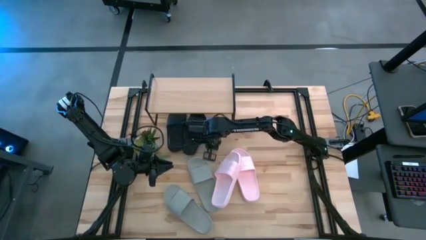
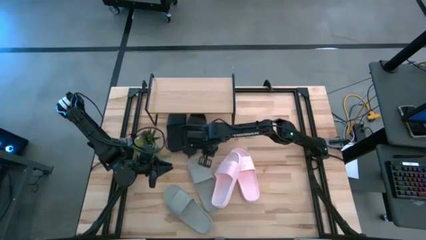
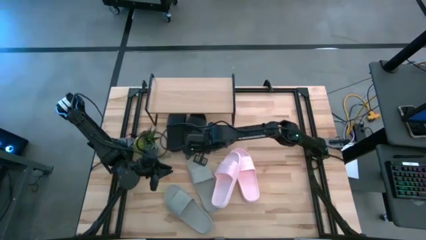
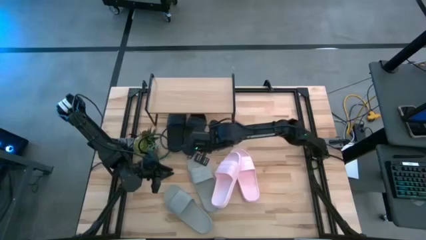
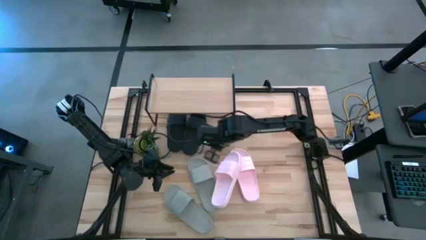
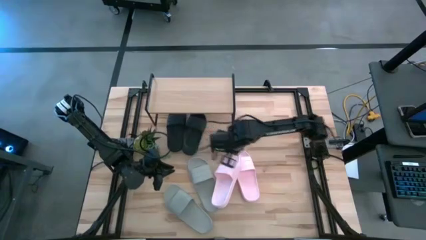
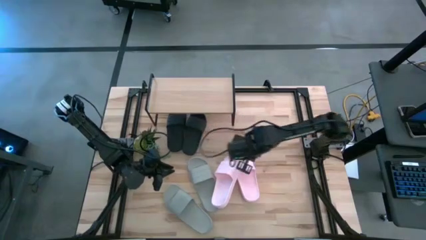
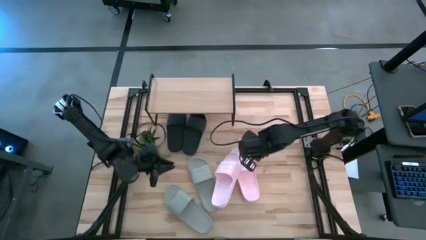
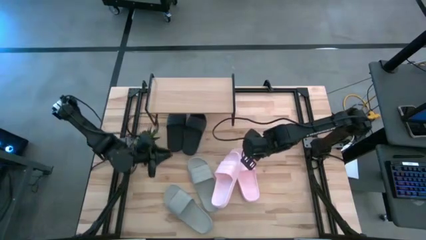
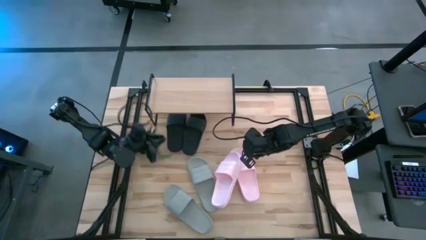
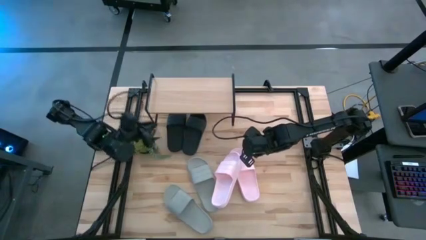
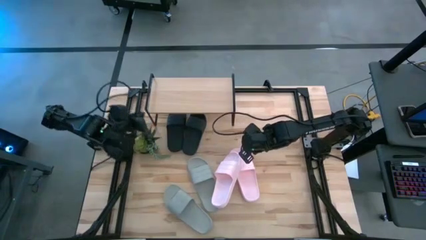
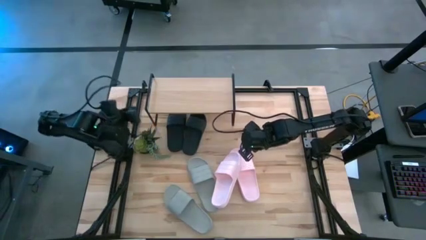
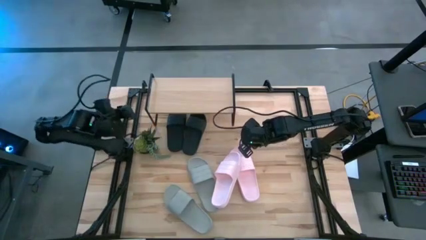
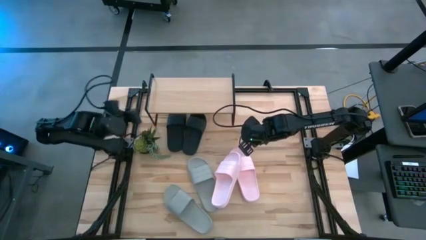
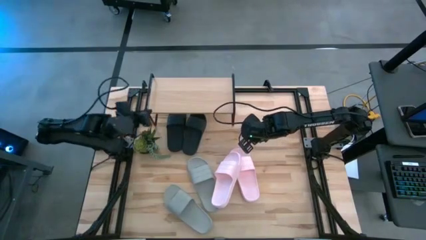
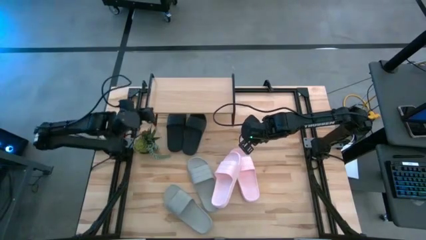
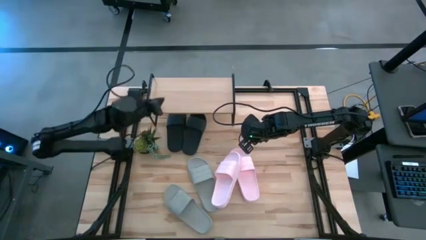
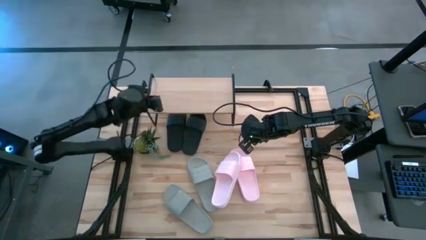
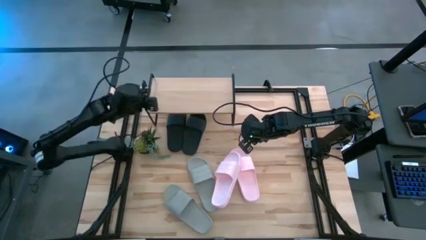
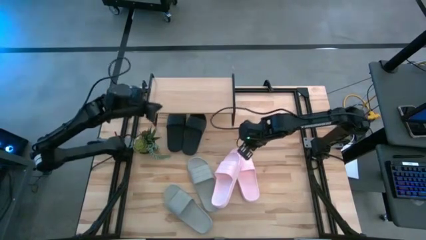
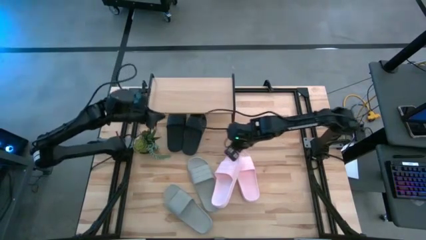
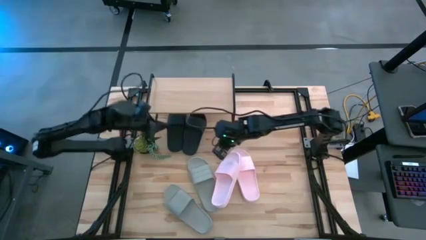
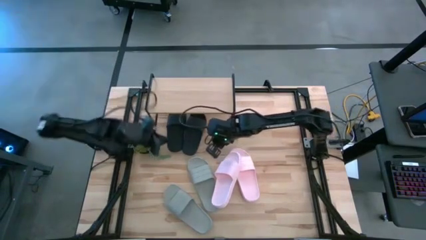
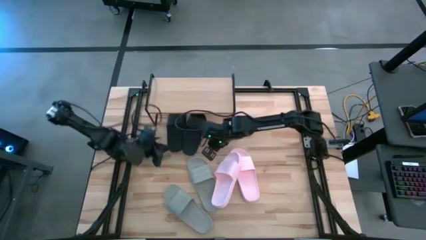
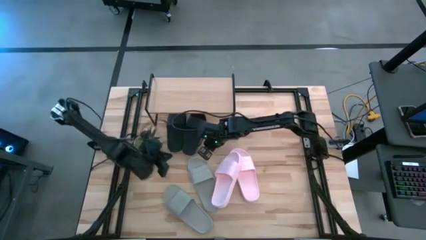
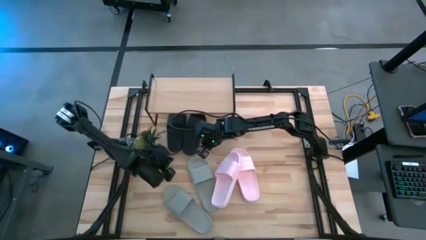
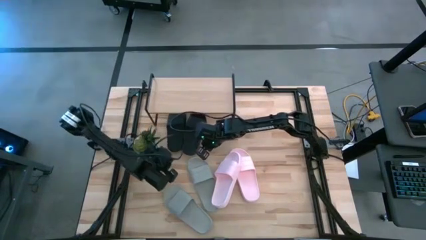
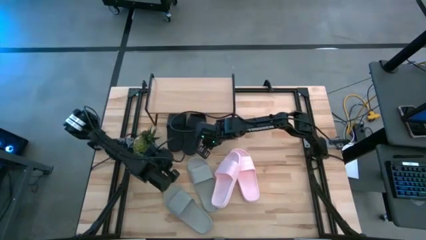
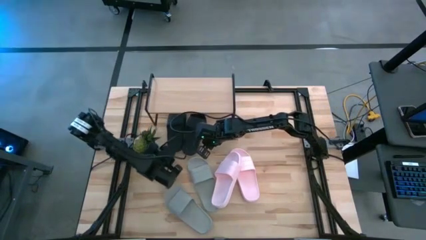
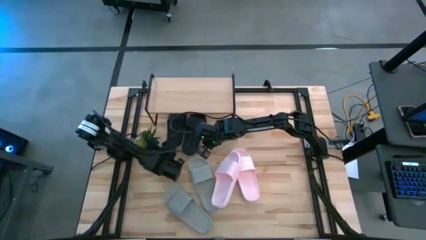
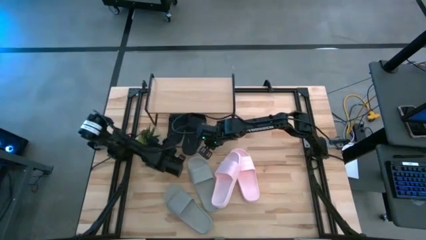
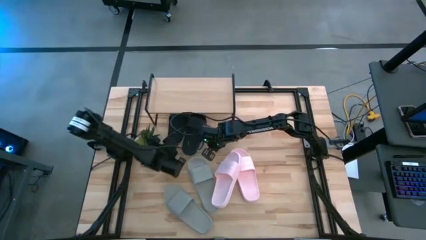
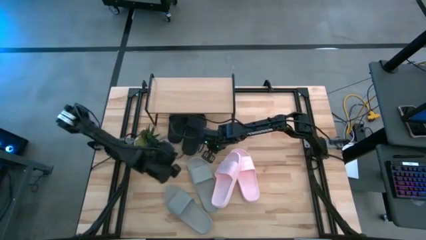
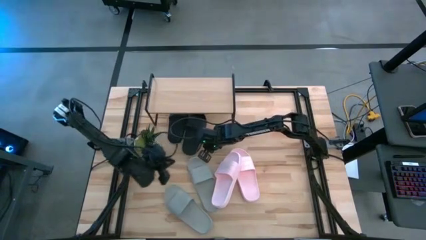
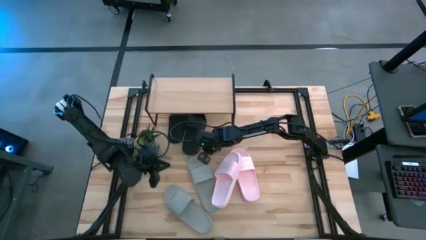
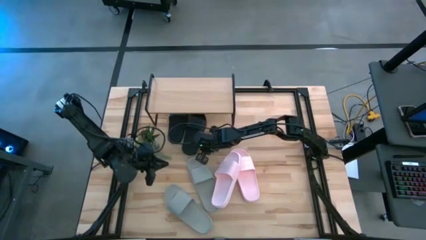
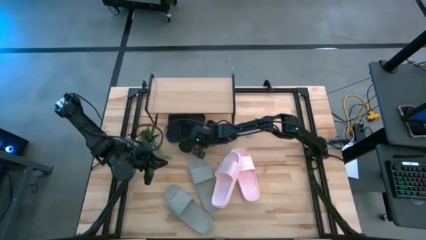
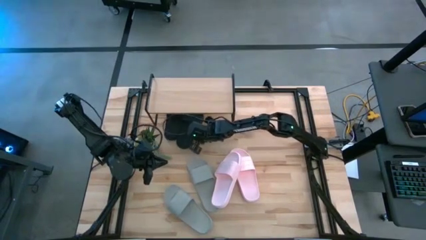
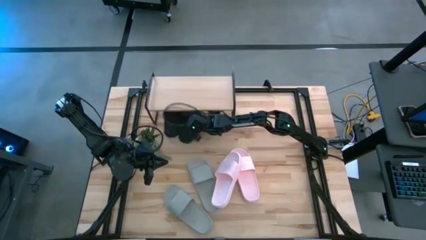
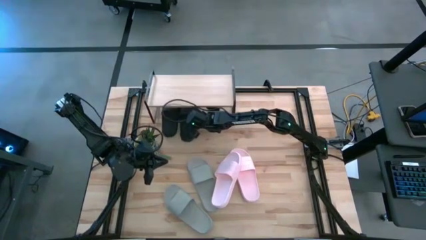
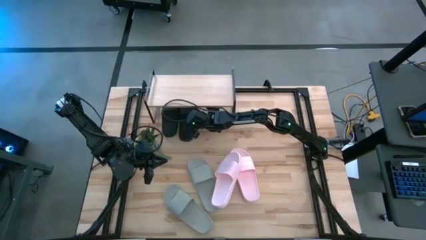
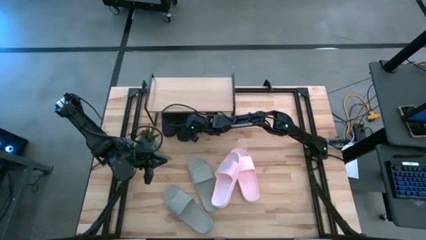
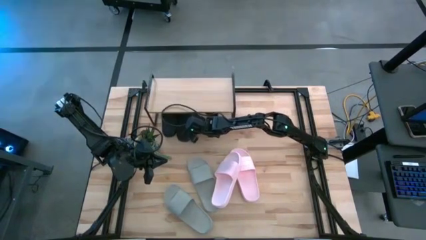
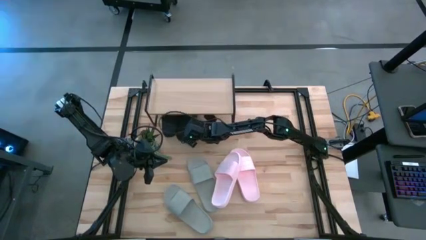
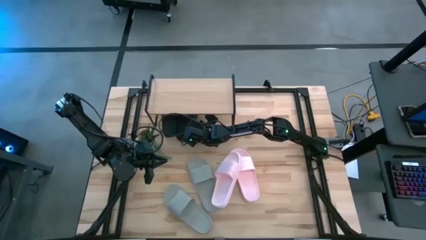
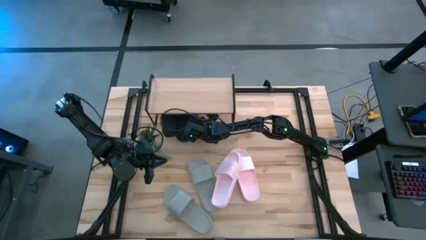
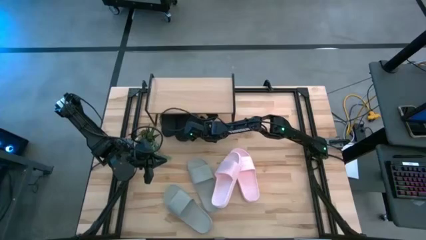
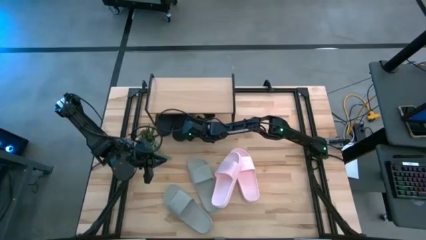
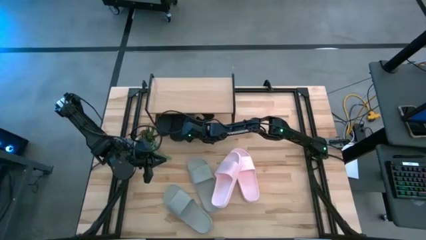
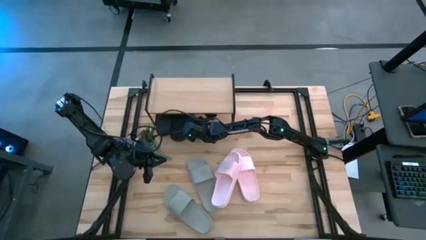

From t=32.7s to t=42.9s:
Task: Pick and place slides into the shelf
Adjust the black sliders

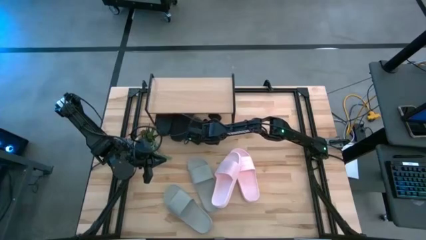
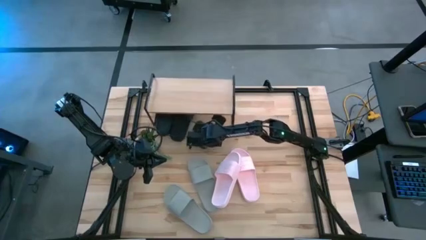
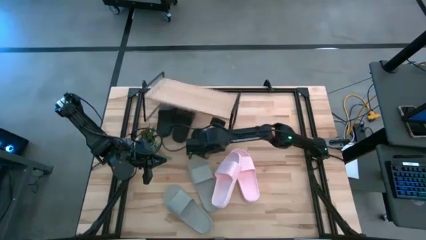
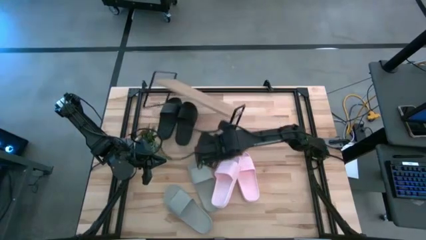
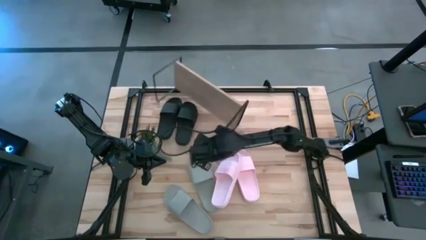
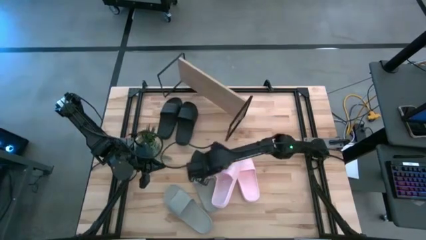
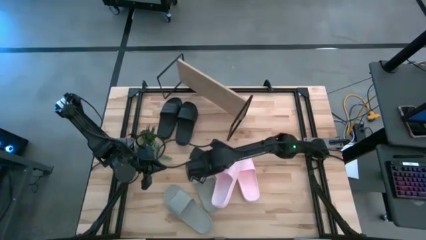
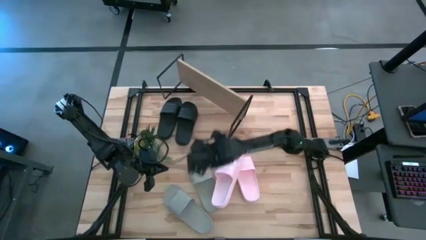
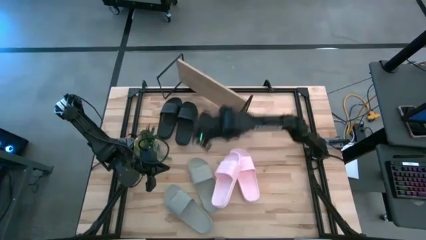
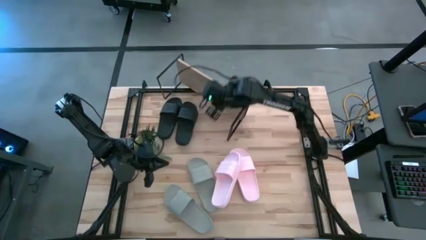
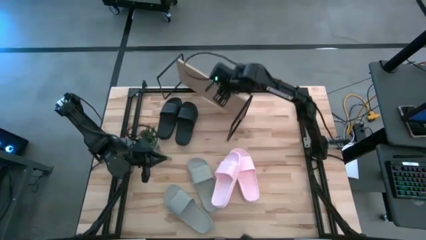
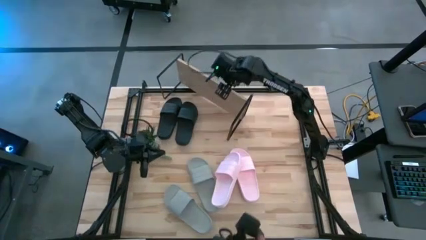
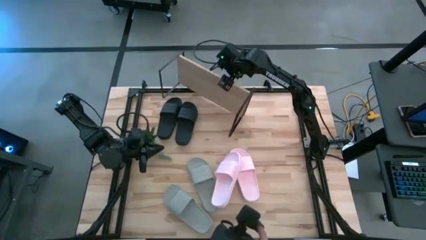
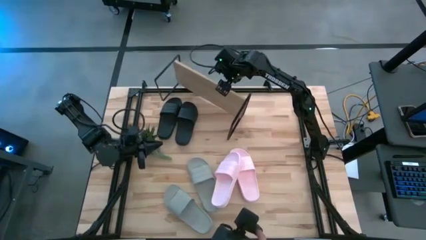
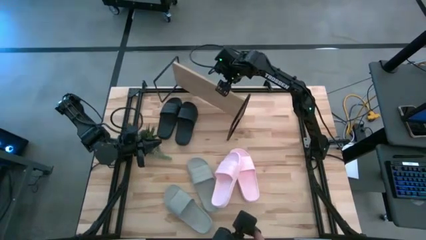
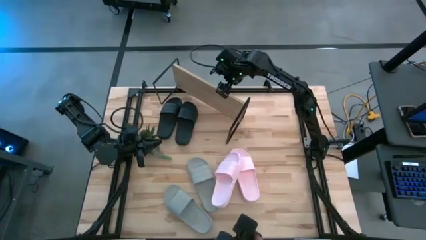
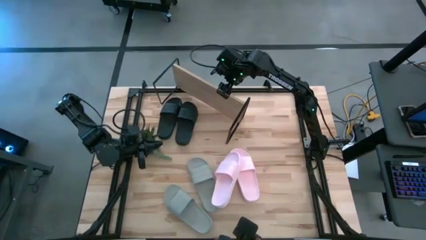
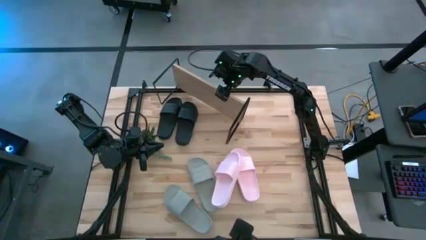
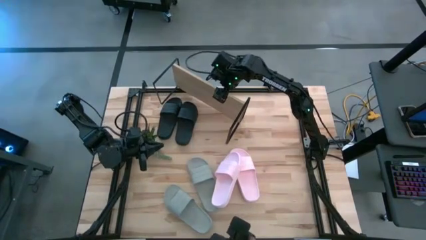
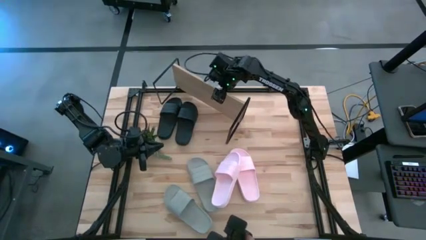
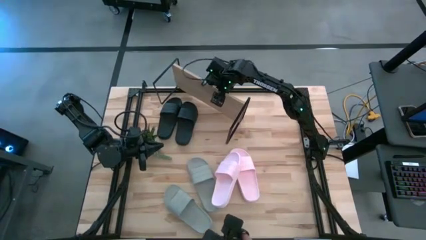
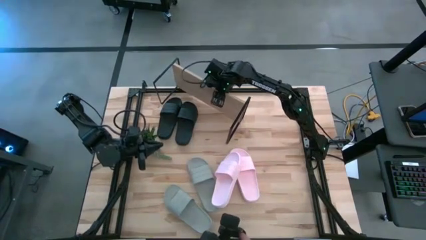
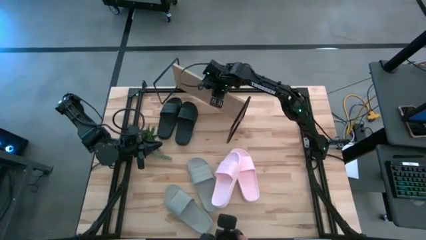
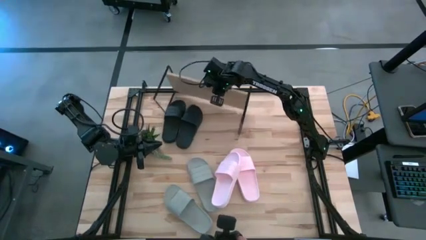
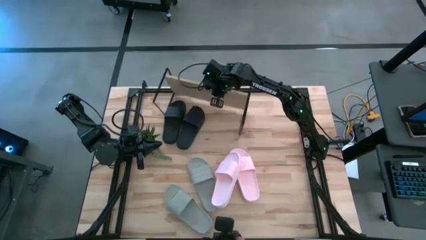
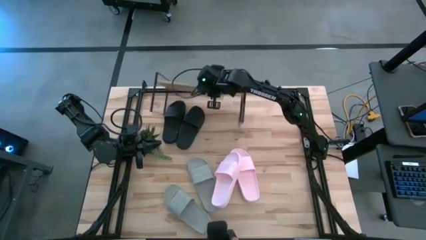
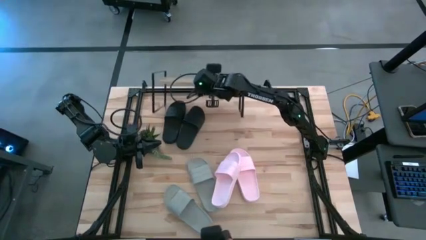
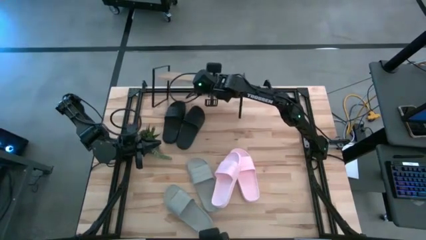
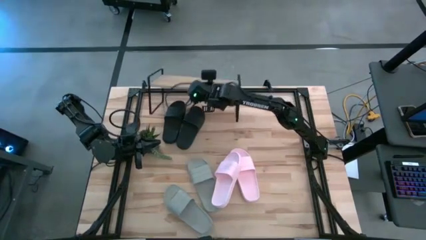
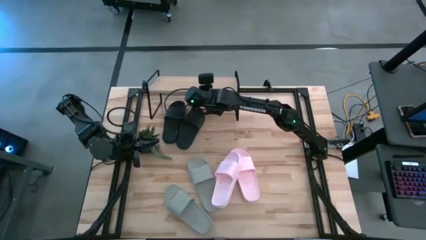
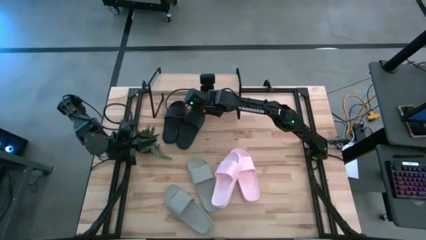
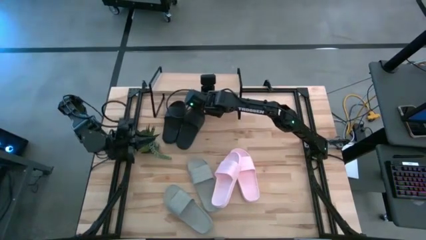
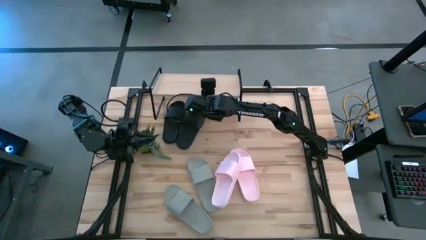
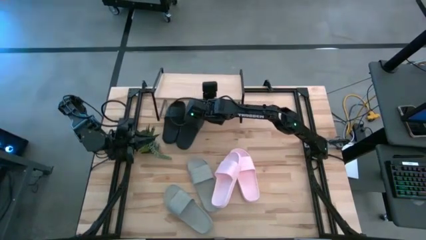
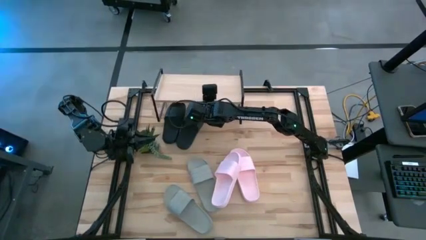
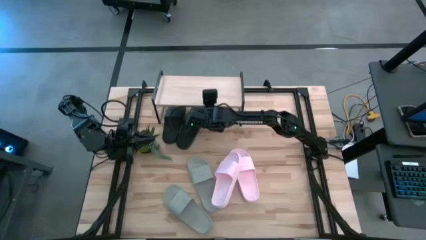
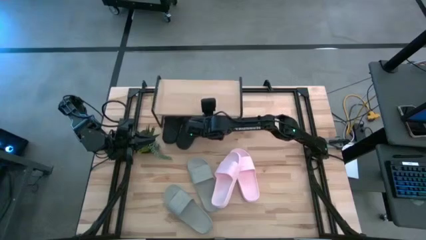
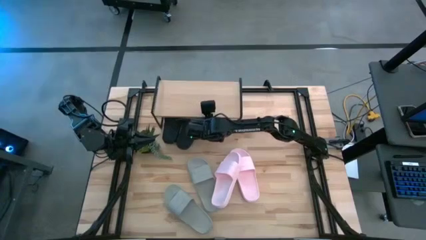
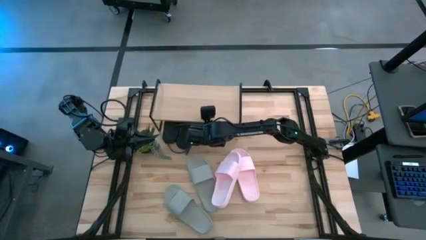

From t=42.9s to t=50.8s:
Adjust the shelf
